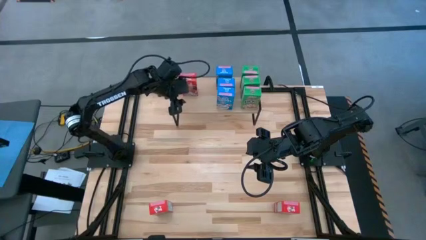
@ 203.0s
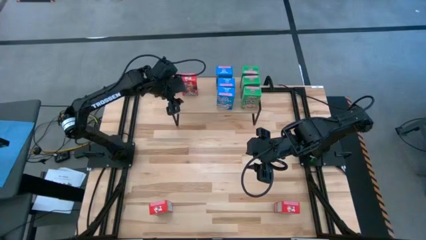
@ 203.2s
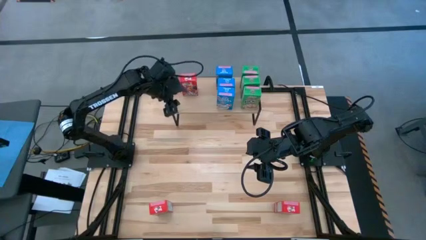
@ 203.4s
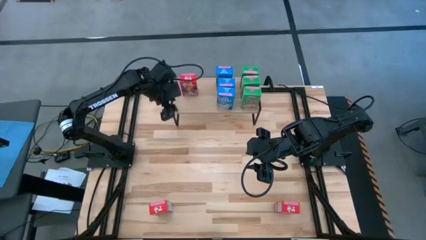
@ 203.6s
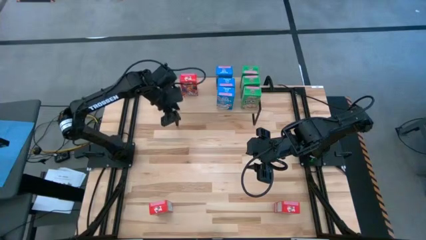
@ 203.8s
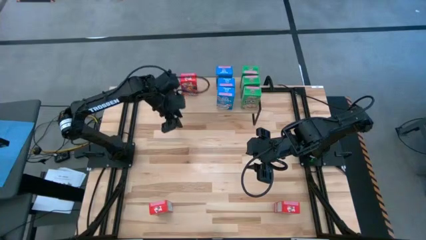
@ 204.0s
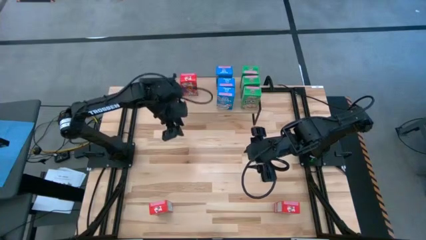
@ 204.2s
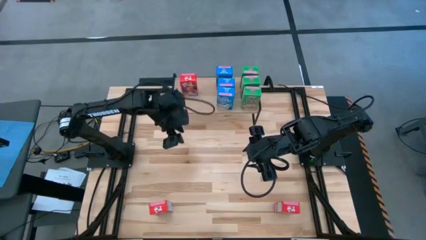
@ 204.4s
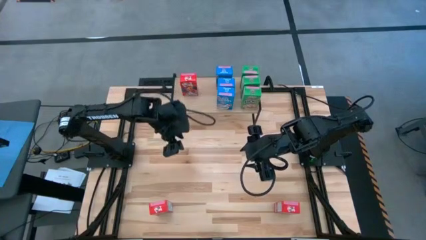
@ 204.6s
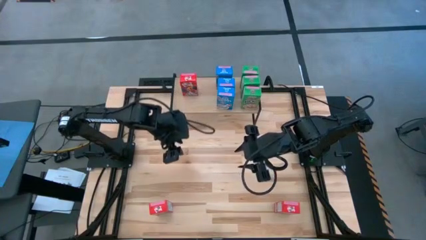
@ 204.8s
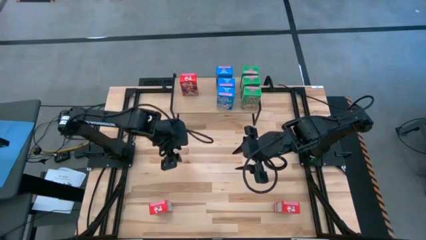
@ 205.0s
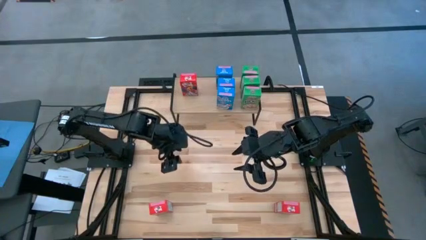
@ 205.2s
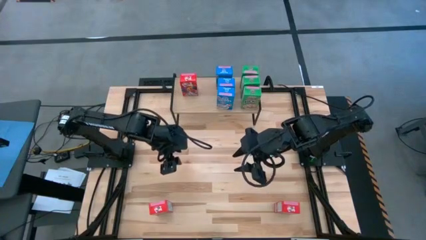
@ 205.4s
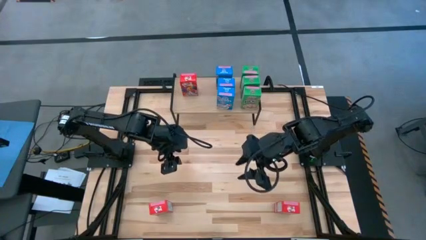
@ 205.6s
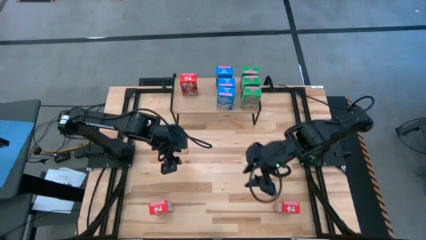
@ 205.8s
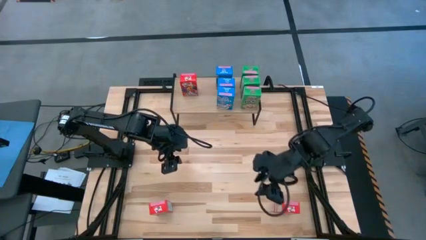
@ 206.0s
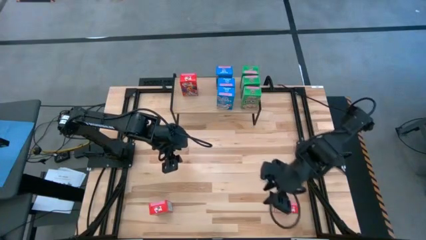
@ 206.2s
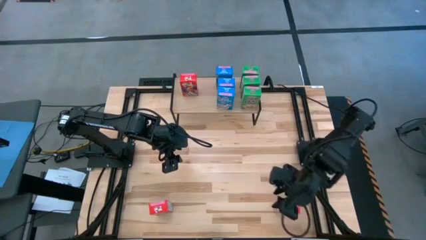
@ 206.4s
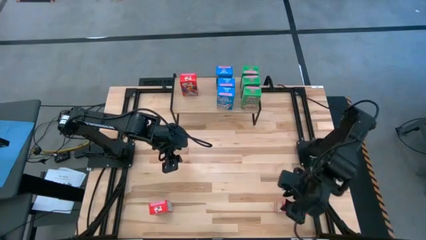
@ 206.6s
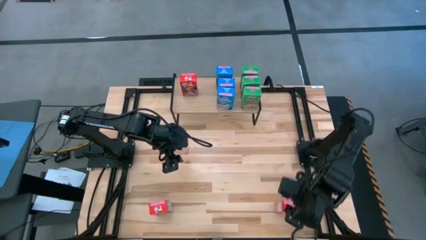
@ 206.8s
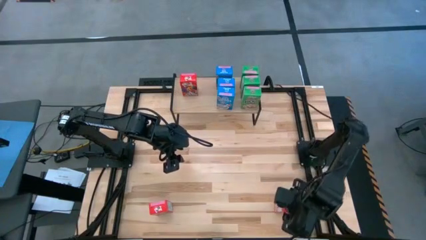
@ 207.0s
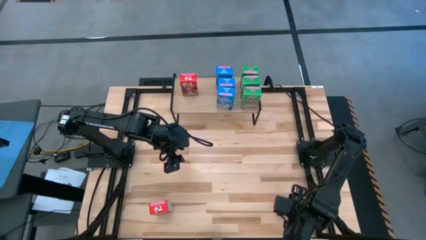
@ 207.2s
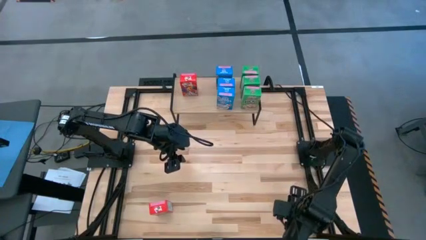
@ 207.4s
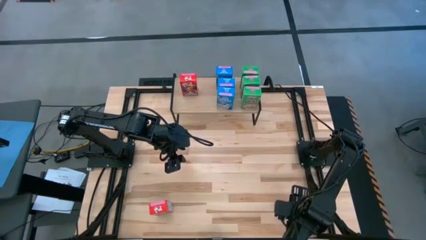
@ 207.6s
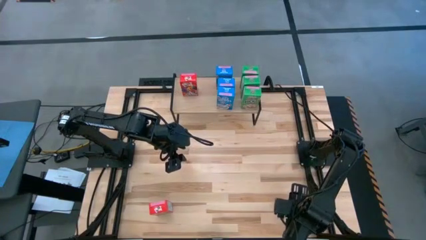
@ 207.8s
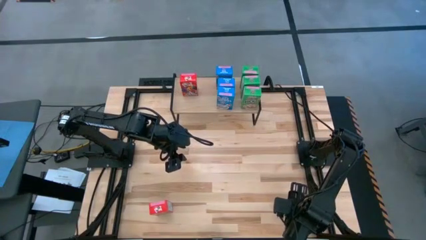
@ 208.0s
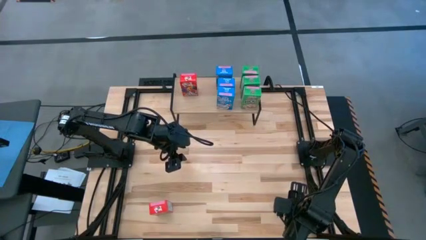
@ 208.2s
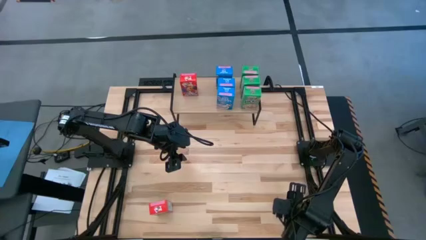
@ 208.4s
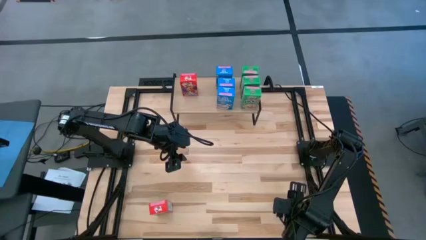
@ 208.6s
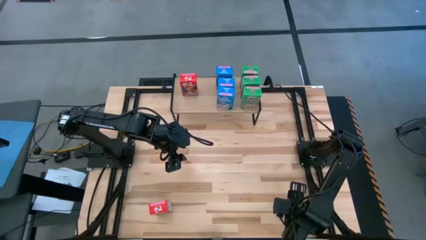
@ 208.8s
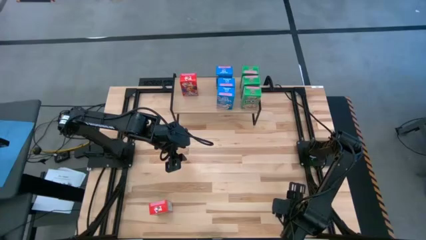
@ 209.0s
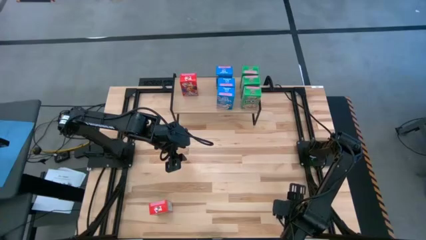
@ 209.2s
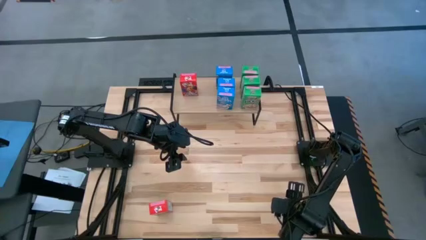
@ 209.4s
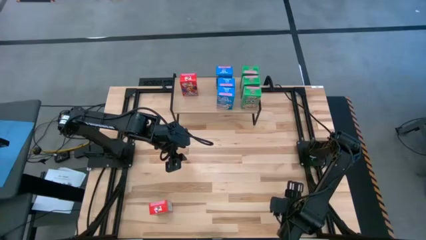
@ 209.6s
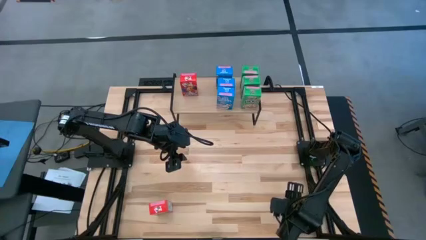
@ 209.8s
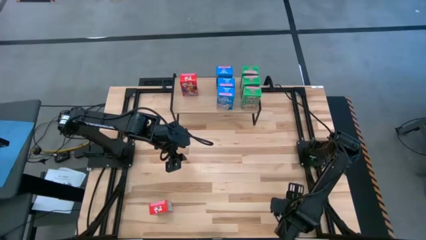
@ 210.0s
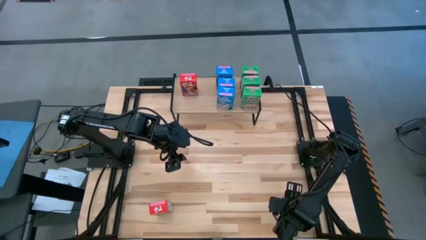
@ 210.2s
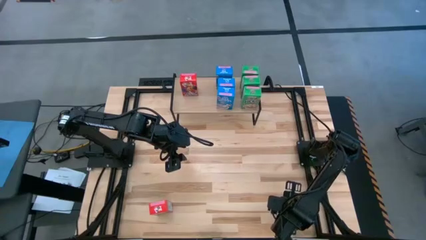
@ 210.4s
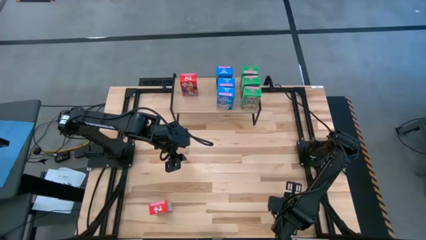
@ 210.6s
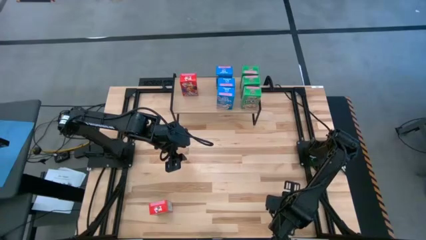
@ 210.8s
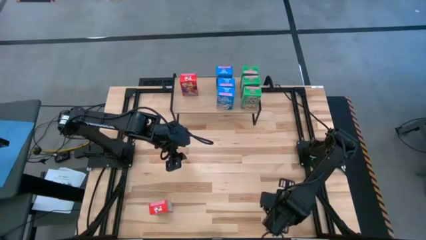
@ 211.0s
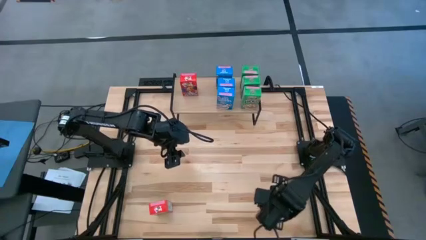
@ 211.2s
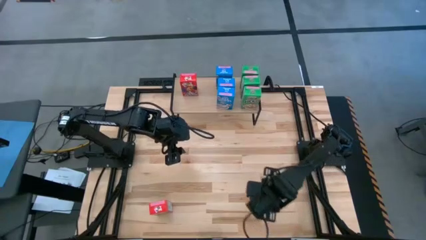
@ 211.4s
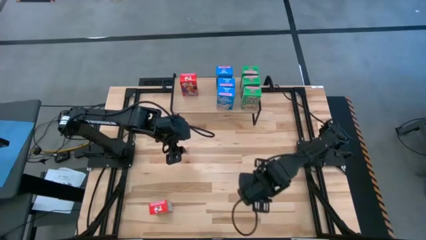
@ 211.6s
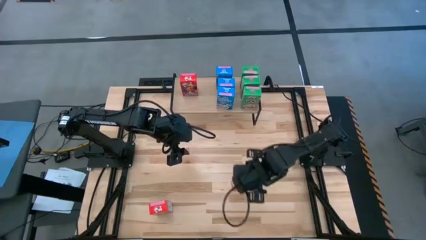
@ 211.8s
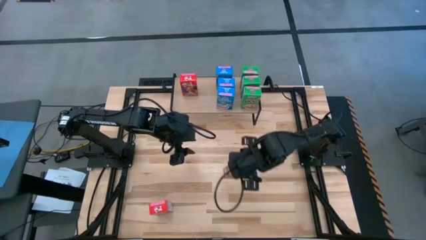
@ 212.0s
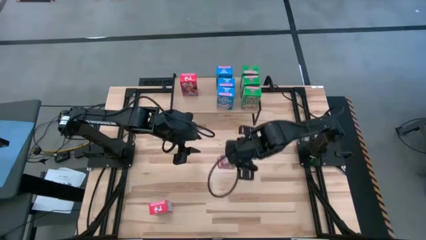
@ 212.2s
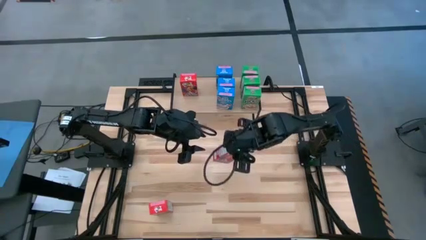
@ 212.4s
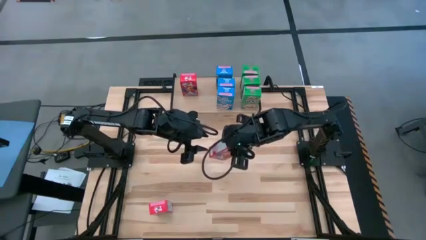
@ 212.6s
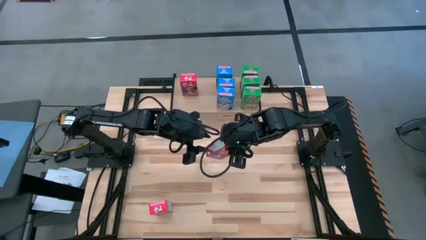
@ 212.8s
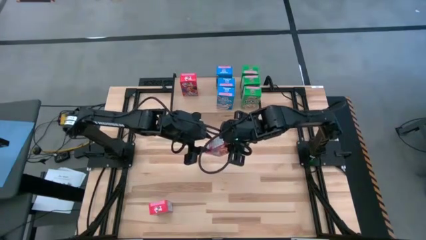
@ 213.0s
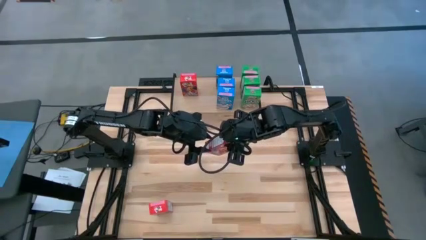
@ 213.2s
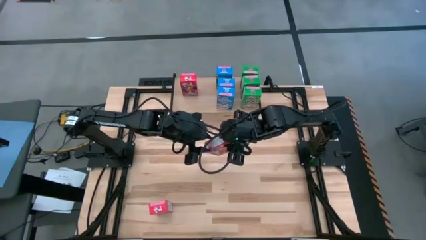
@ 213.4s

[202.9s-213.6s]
Task: Stack cereal on shelf
Put the right red cereal box on the shelf

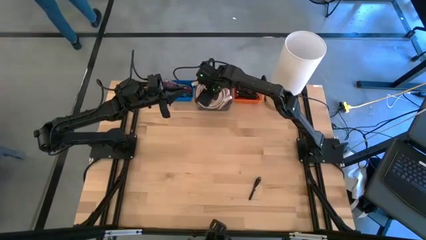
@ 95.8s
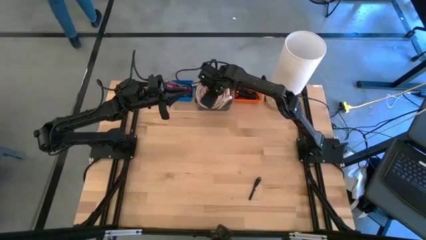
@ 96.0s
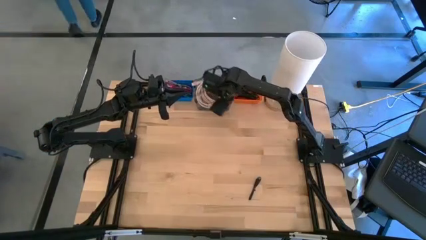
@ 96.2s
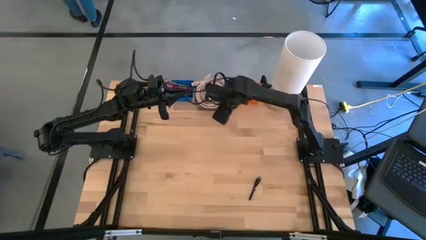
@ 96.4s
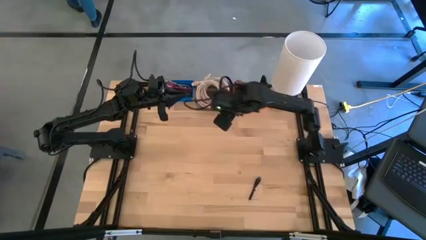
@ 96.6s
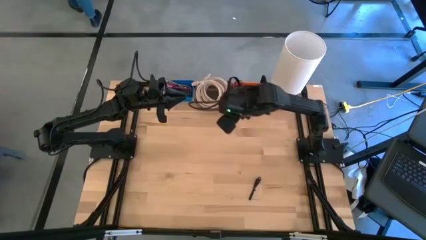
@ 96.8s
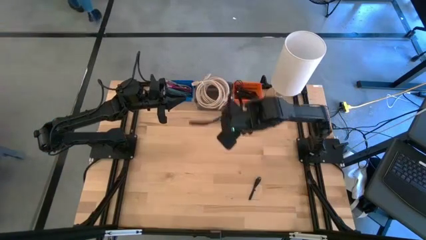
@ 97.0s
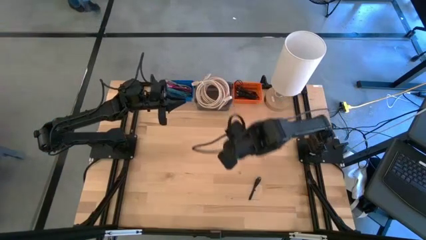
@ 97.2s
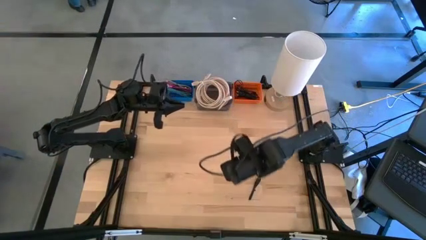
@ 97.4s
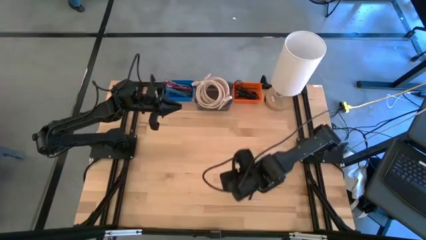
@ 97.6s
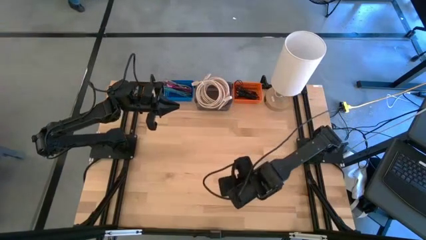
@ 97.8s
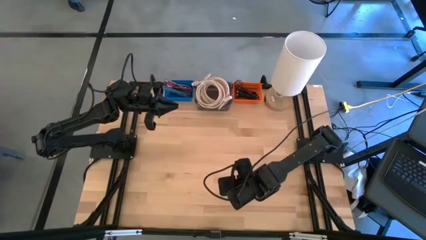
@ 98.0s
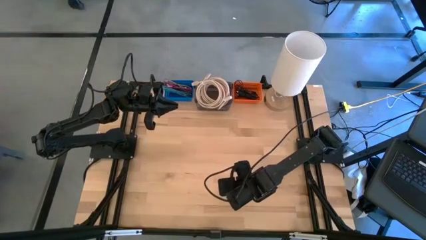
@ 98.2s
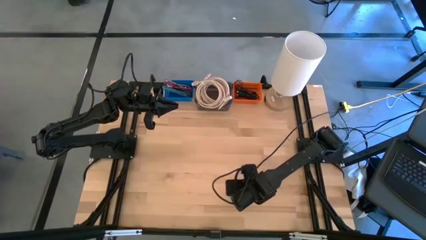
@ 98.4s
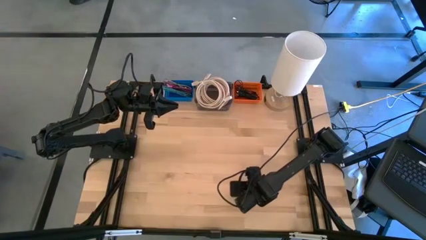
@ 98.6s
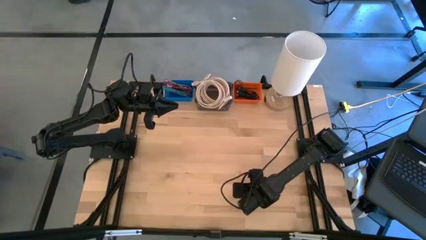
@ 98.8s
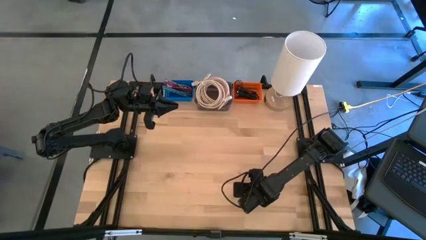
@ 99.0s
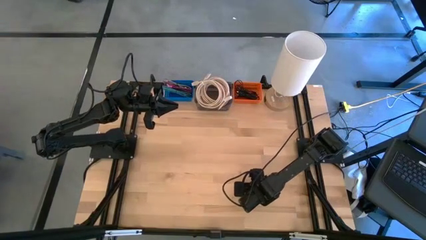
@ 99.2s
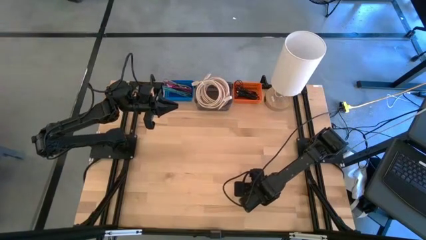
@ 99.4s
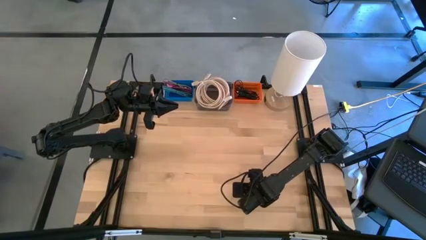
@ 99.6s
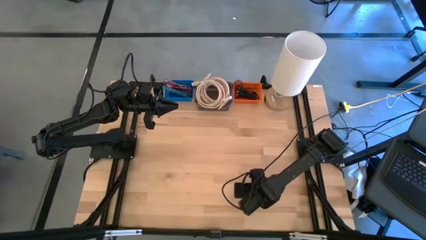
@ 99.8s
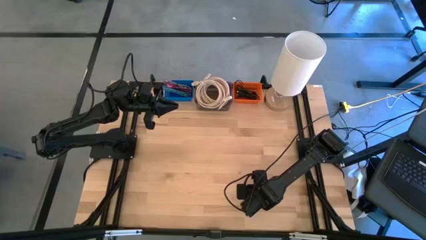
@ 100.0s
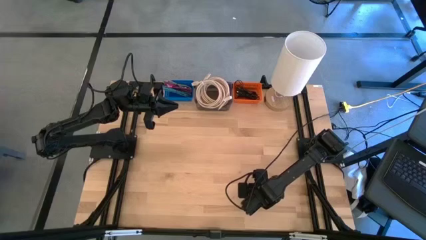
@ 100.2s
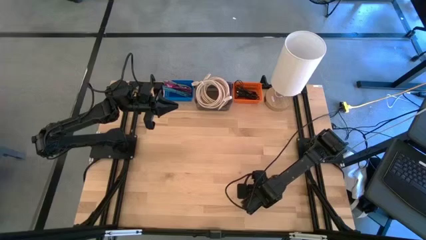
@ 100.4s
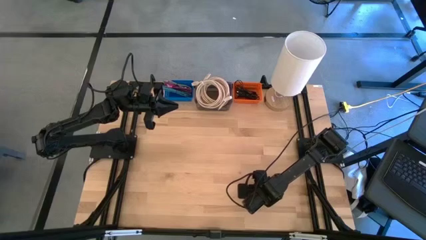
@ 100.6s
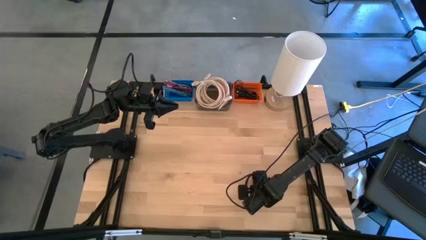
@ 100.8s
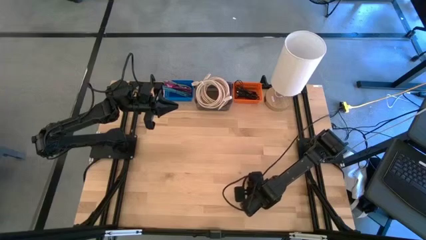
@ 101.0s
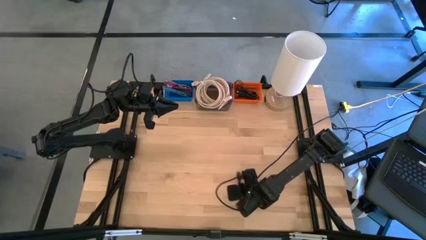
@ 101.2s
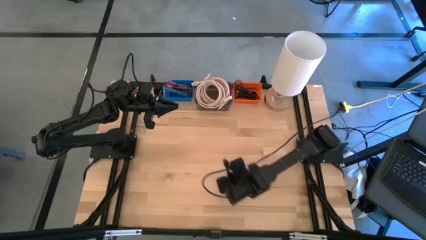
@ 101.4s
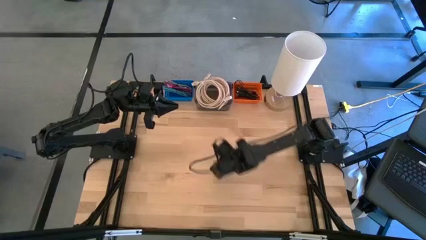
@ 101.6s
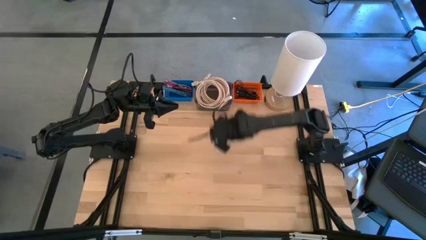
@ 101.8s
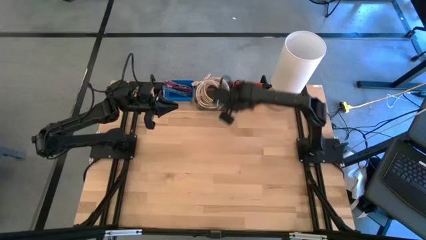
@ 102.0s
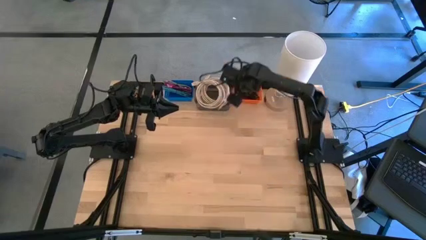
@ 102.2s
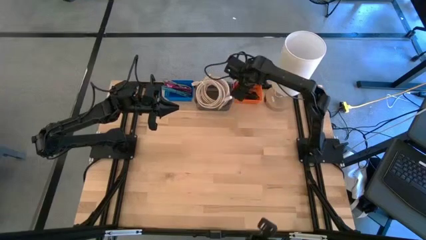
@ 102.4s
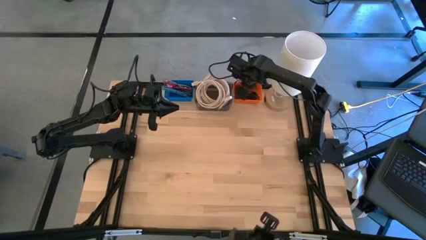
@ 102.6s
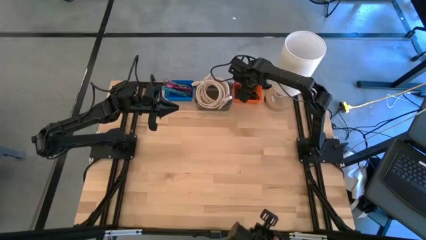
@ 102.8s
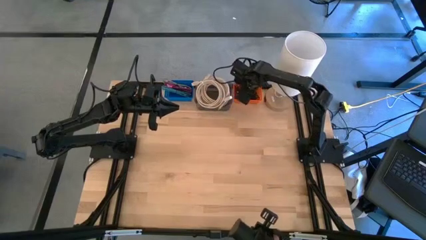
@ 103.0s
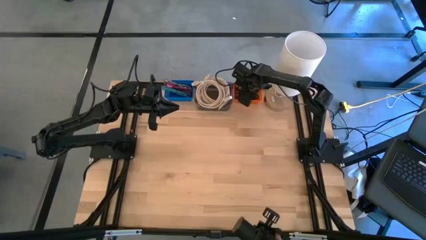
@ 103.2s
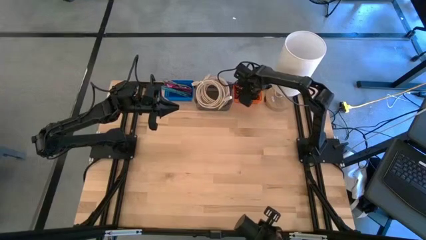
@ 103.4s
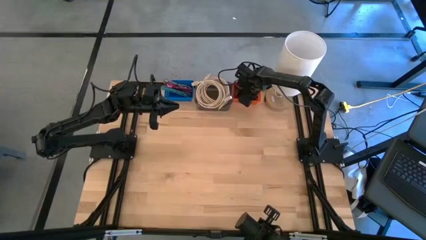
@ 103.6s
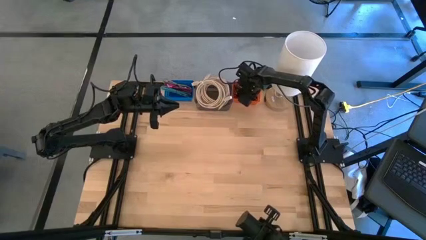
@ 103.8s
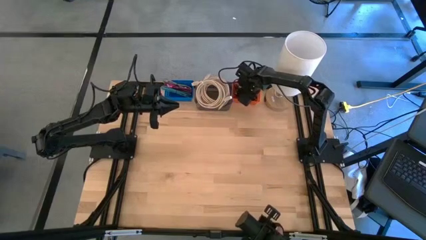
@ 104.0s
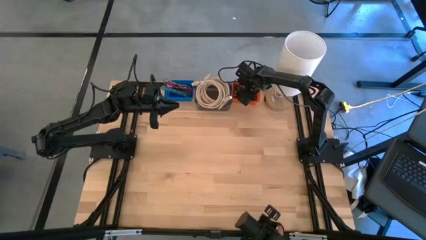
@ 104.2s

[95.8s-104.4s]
Task: Pick & Place USB Port
Put the black charger cable into the orange bin
